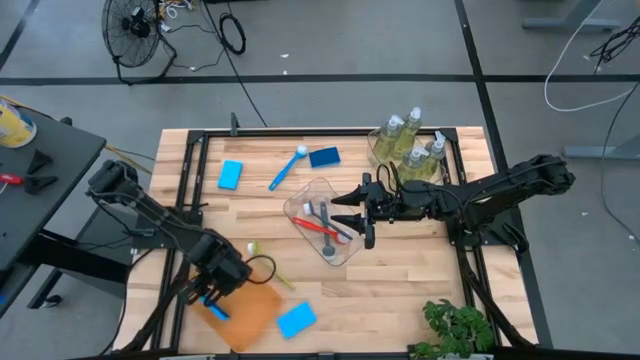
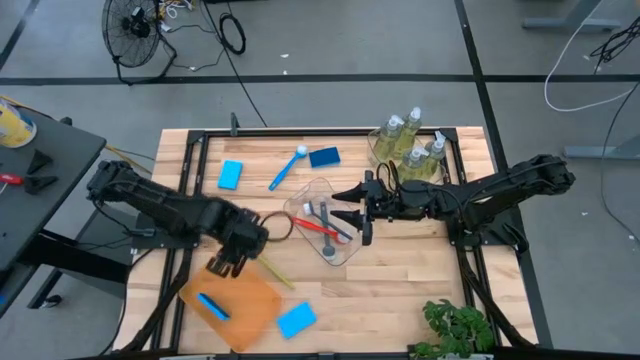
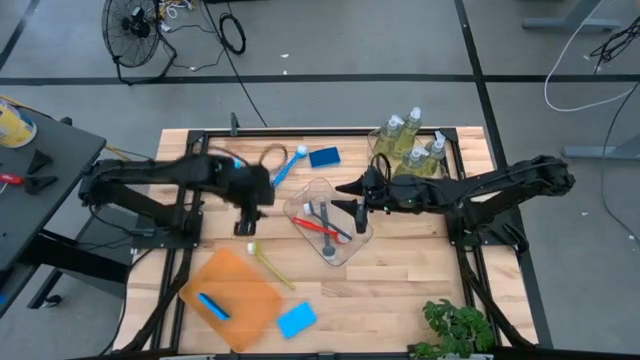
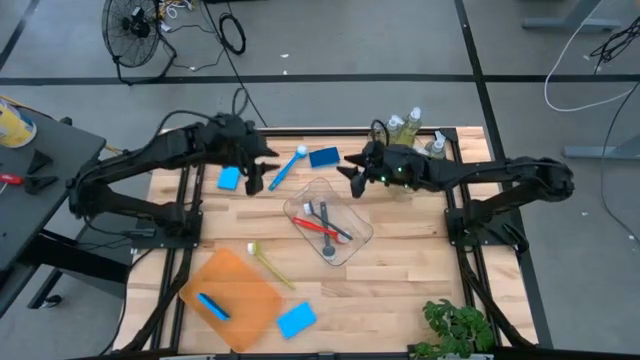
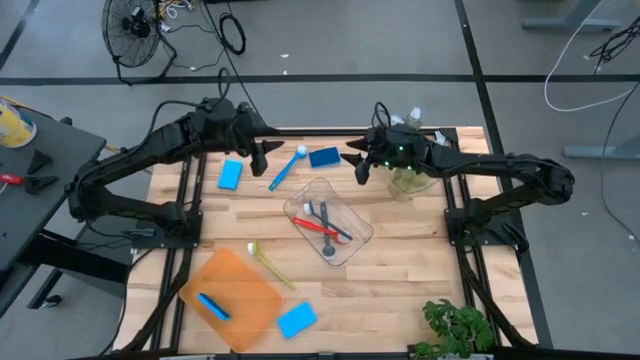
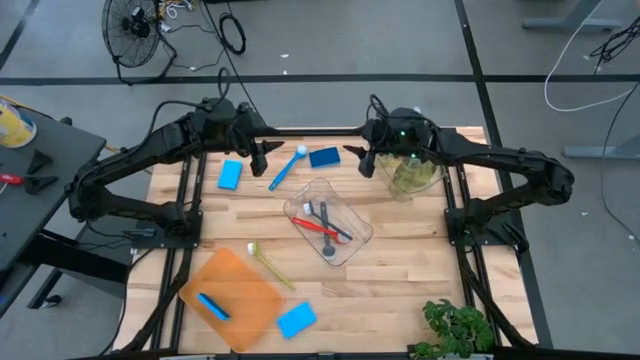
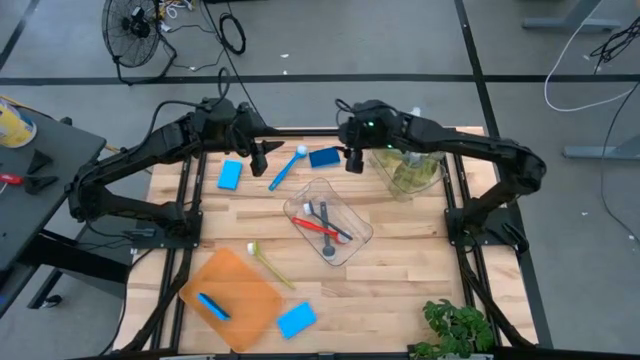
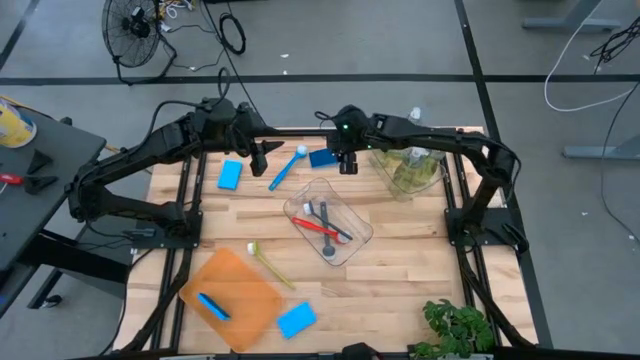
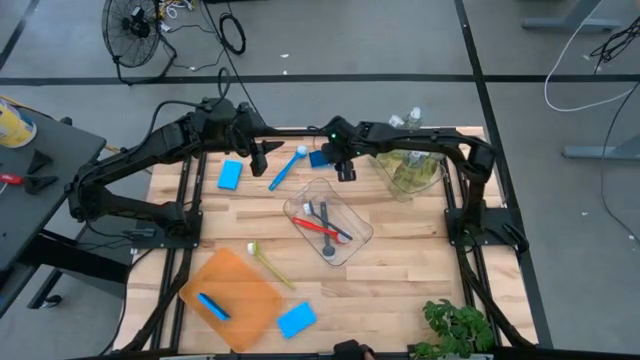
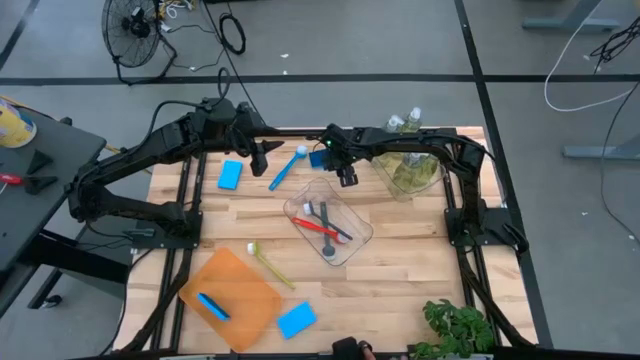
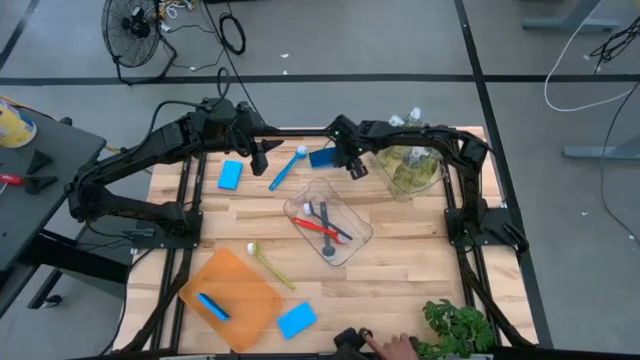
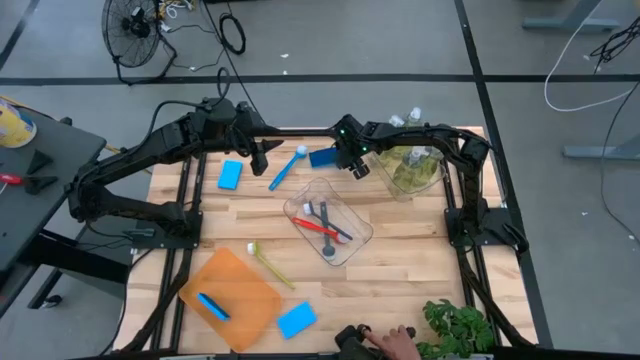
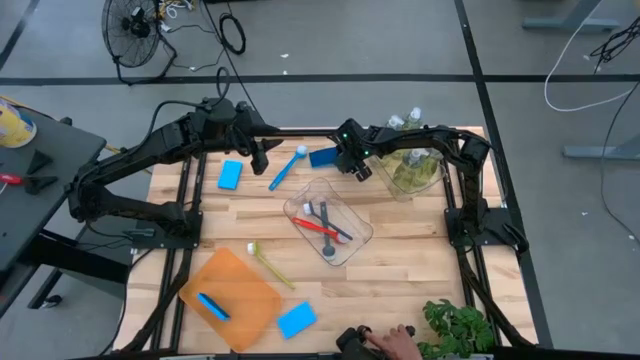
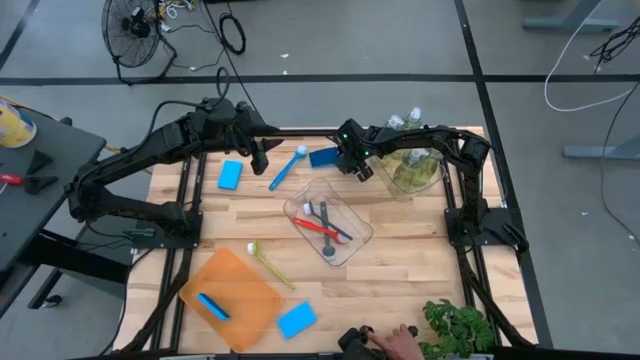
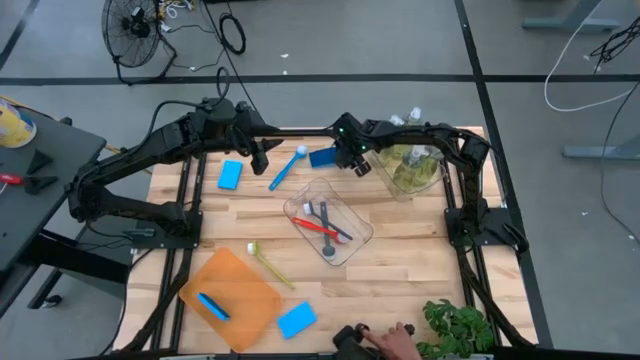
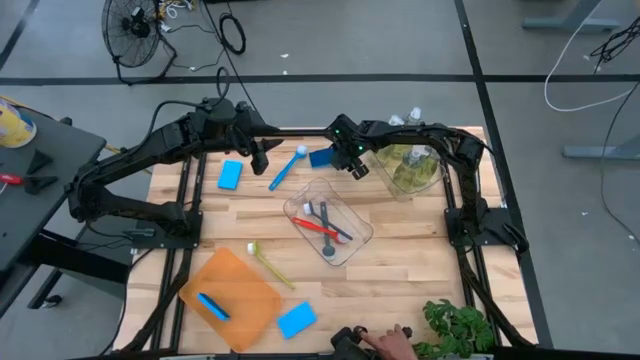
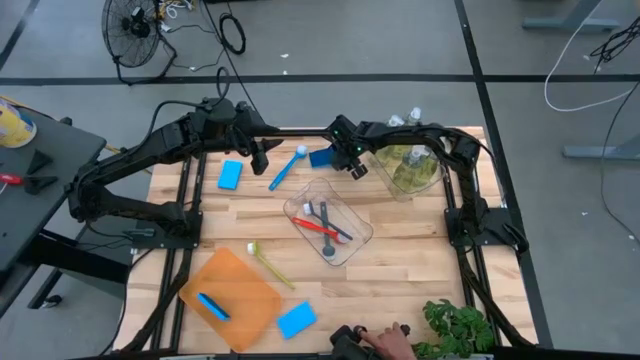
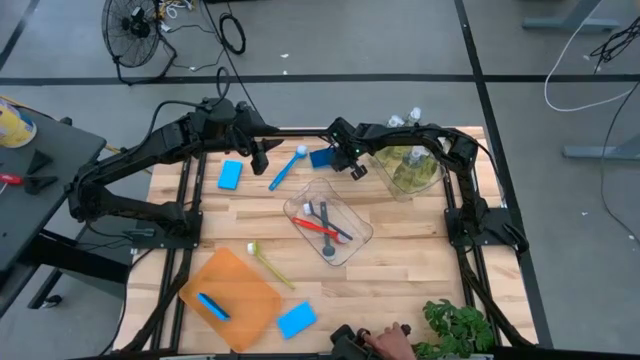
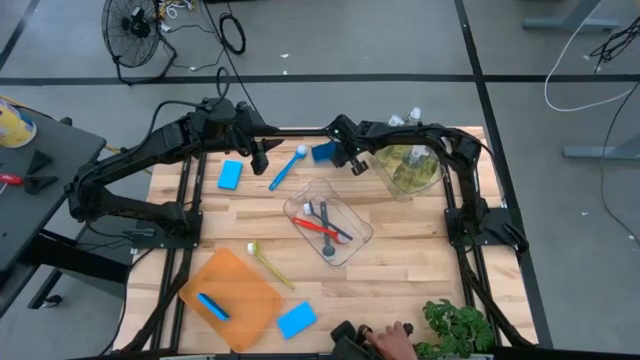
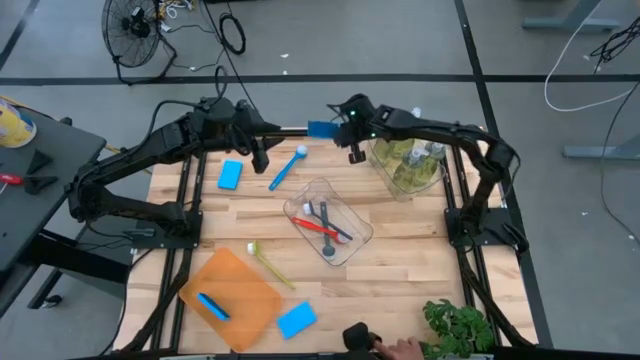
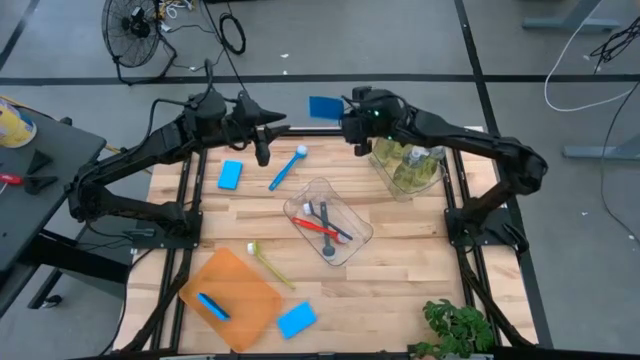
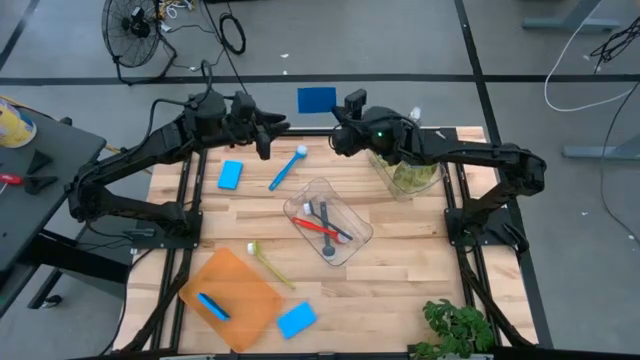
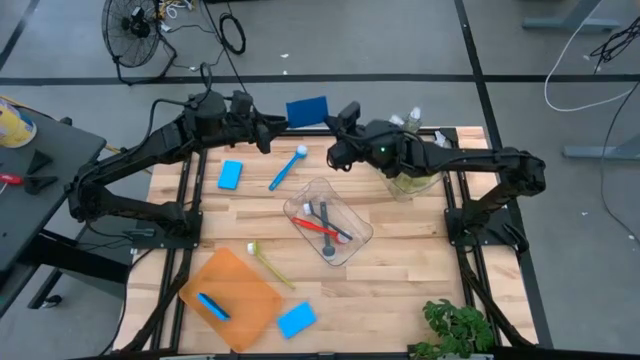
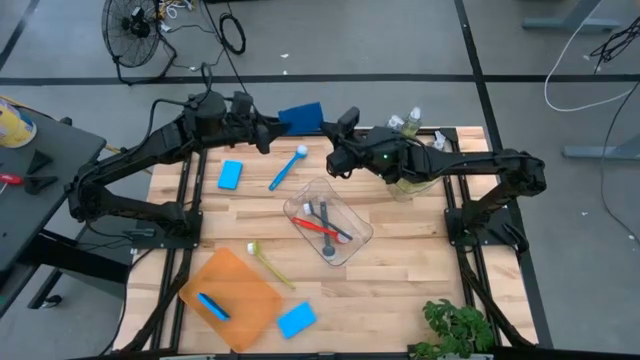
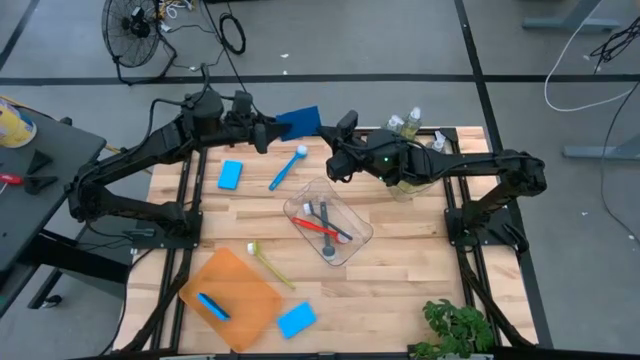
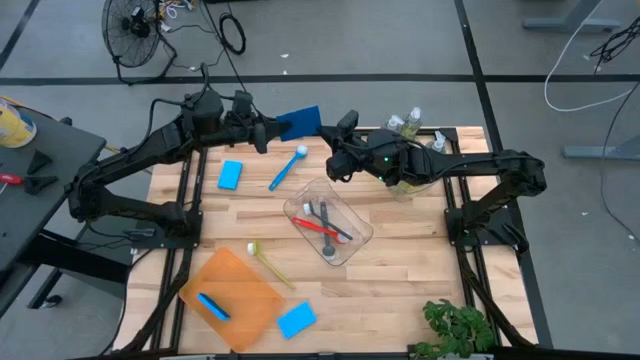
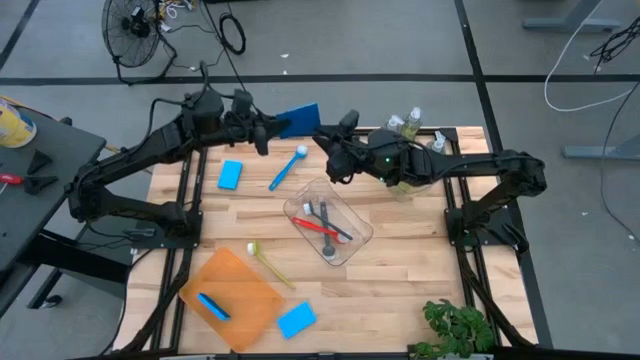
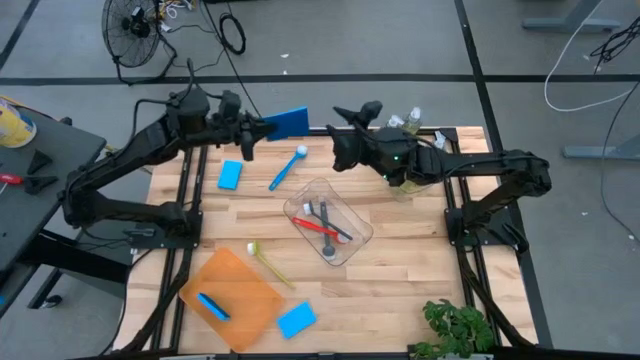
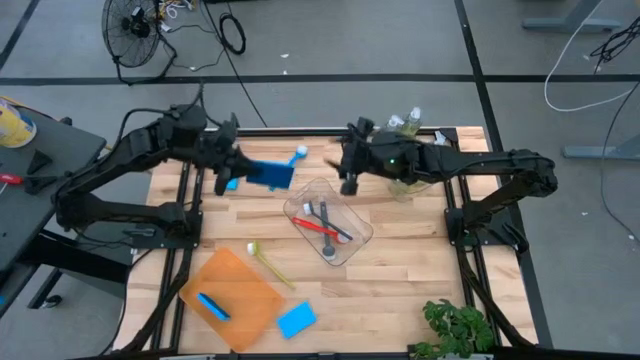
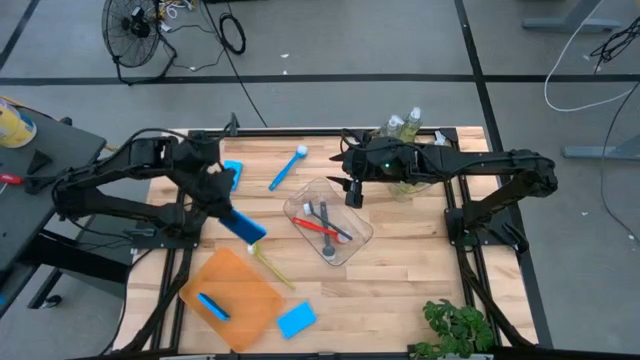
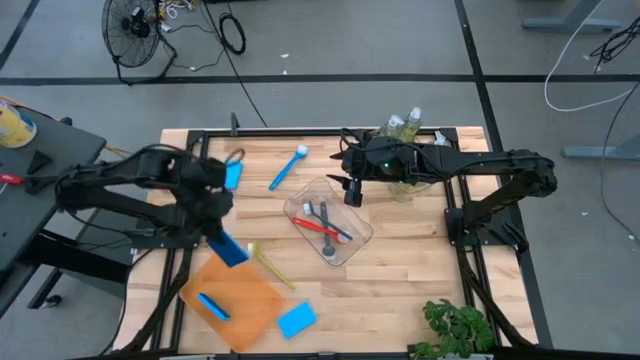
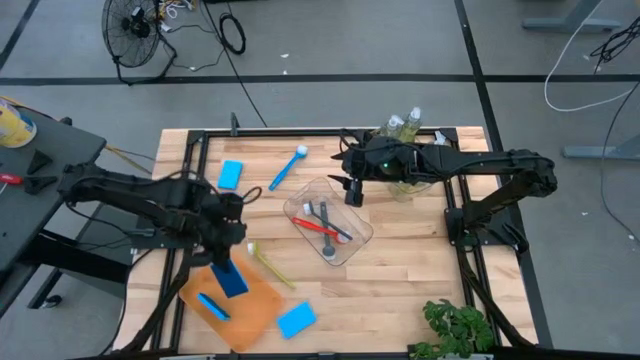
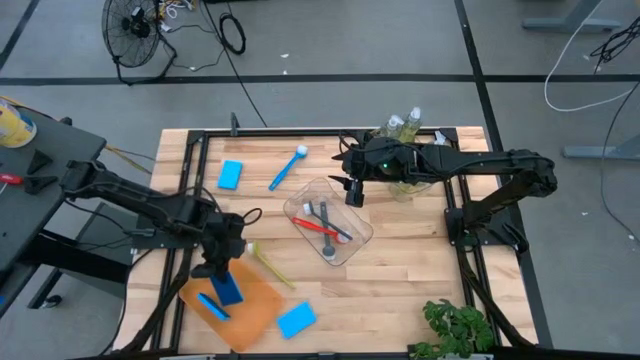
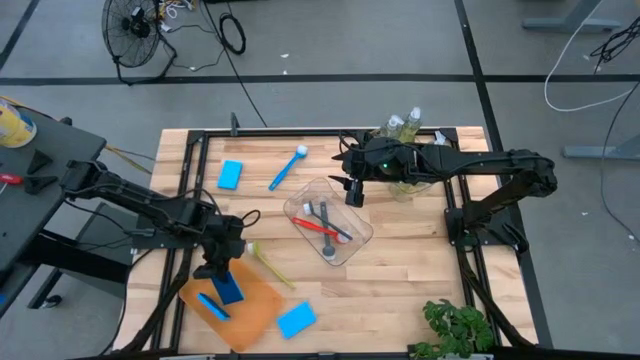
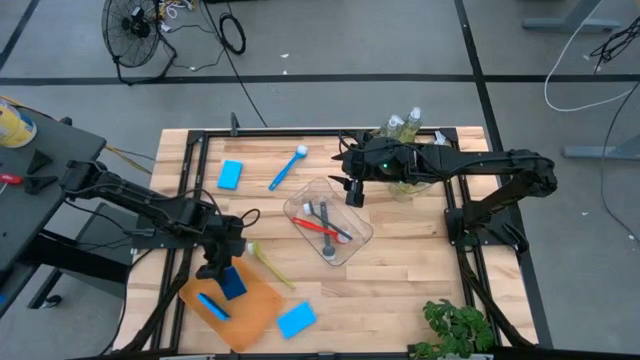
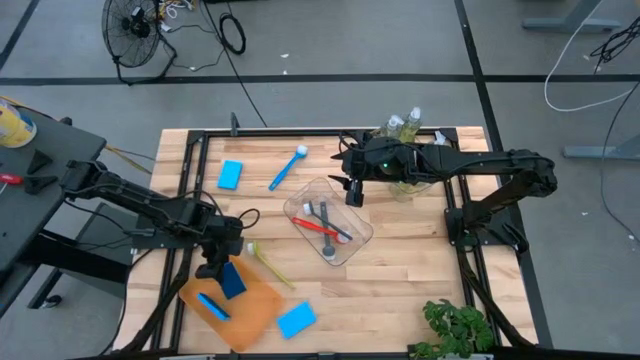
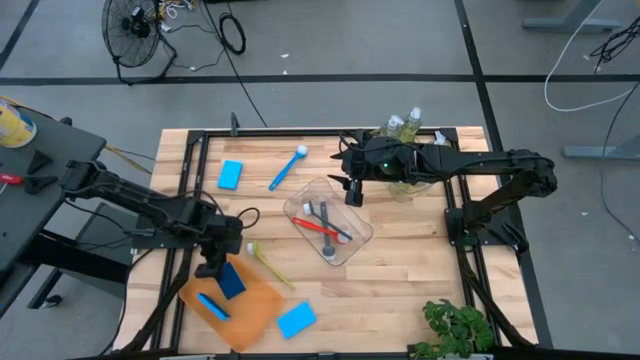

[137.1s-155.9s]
Task: Pick & Place Kitchen Sink Supplies
Put the blue sponge into the transparent orange bin

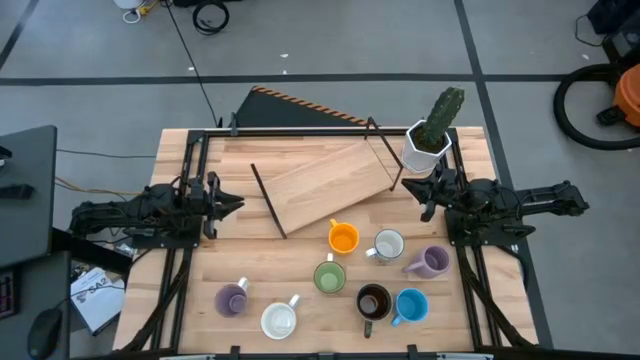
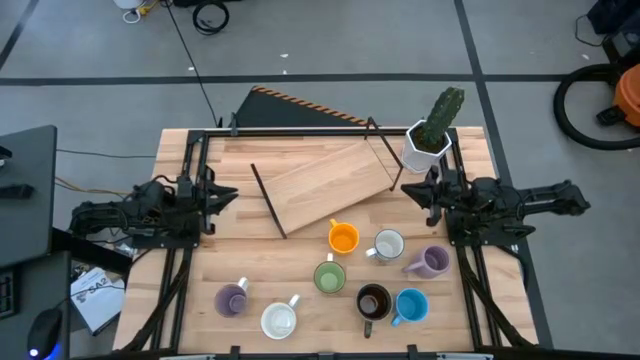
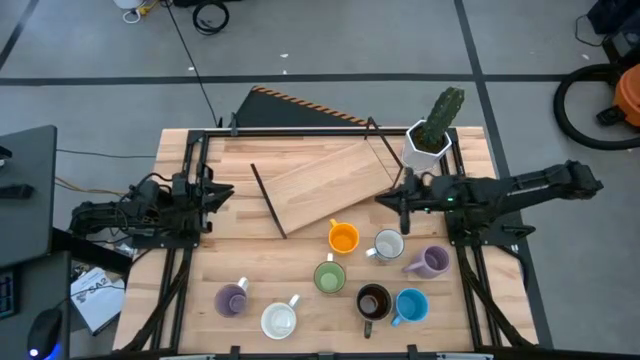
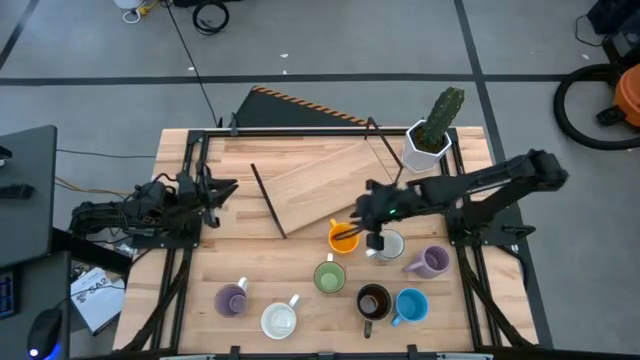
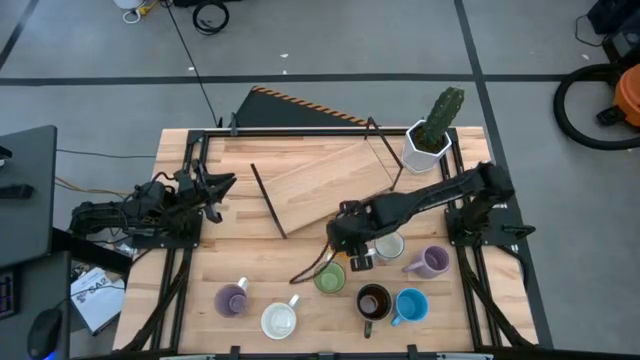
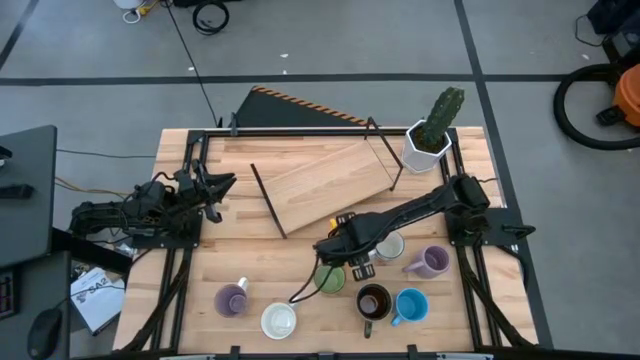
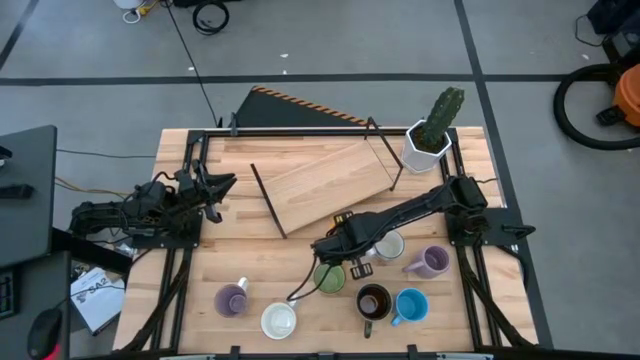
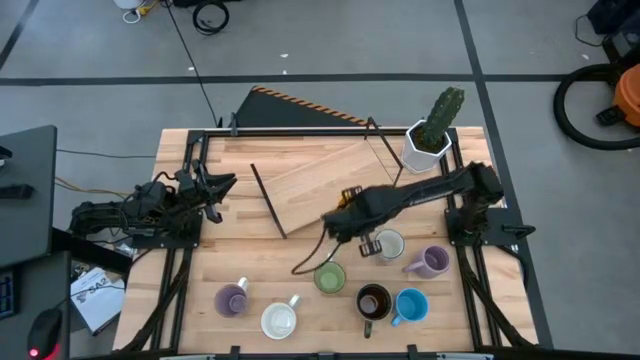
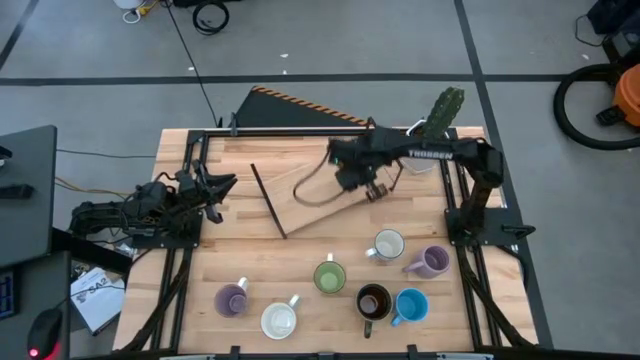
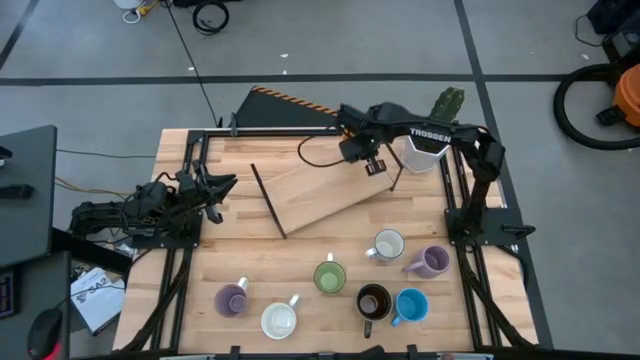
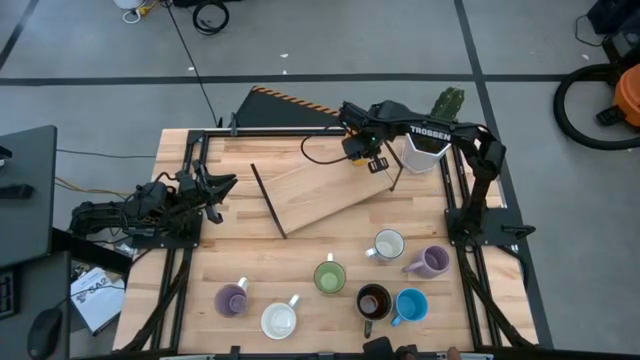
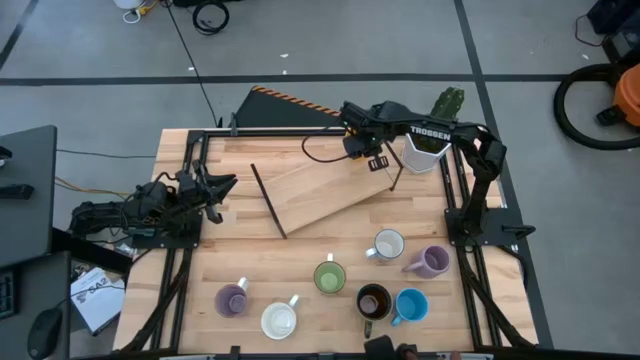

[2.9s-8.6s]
Task: Place coffee mugs
Put the yellow mug on the shelf
